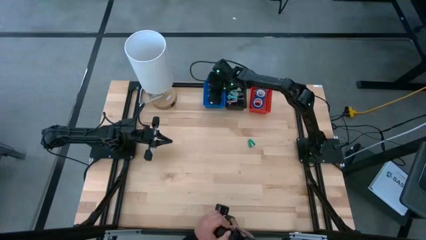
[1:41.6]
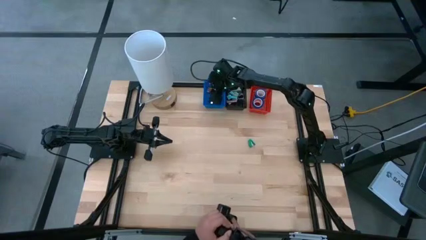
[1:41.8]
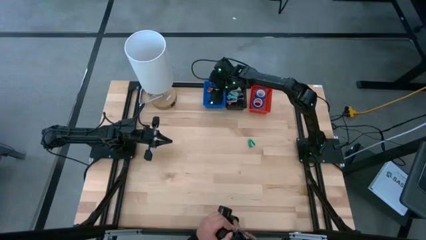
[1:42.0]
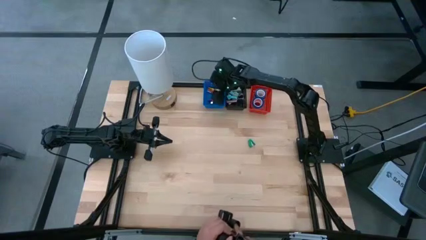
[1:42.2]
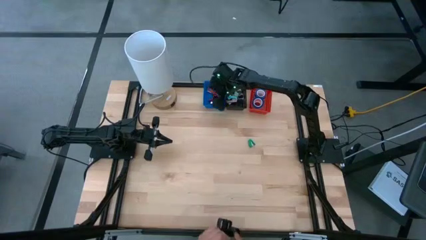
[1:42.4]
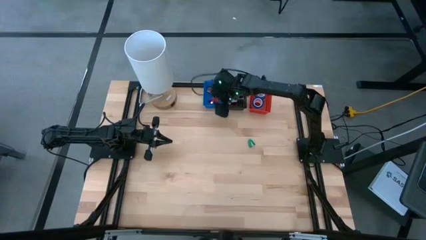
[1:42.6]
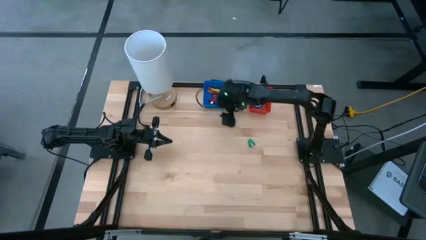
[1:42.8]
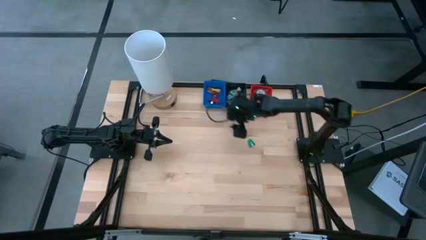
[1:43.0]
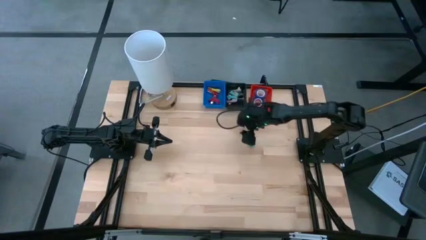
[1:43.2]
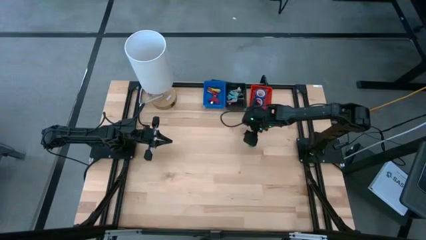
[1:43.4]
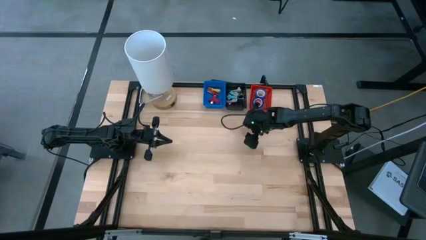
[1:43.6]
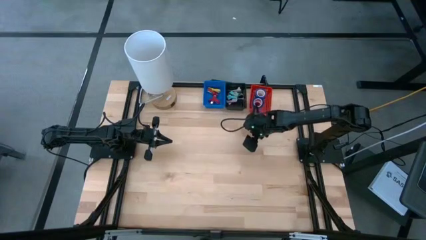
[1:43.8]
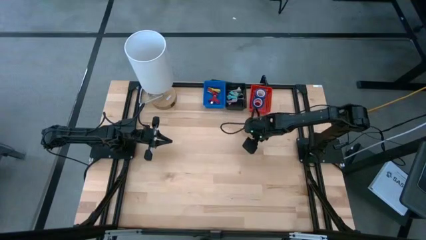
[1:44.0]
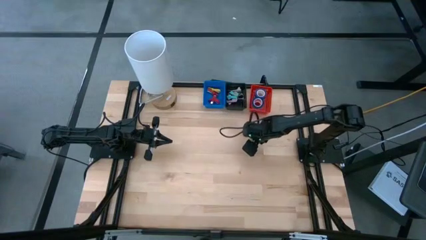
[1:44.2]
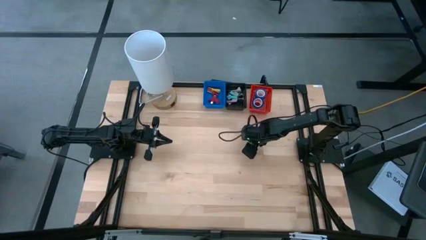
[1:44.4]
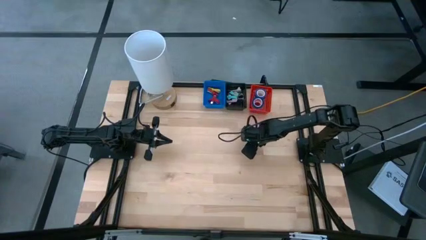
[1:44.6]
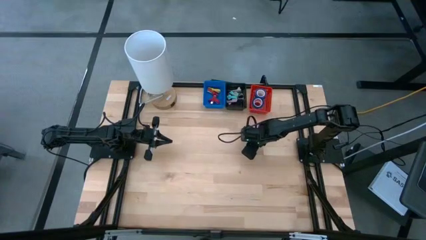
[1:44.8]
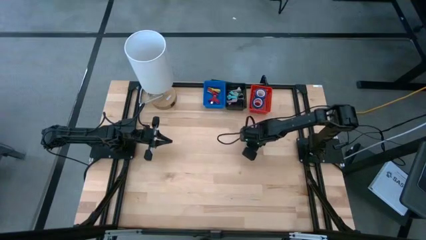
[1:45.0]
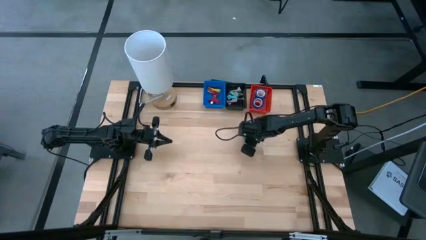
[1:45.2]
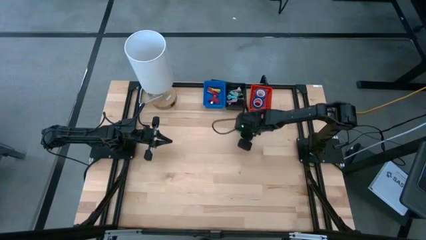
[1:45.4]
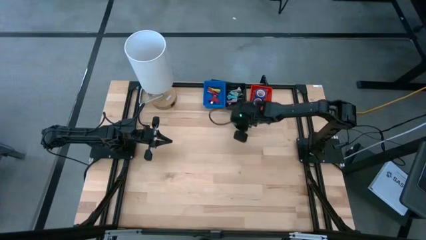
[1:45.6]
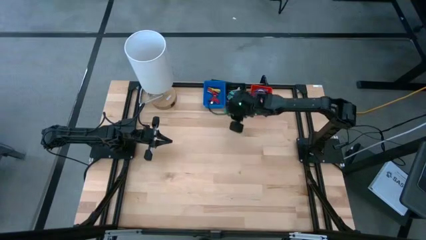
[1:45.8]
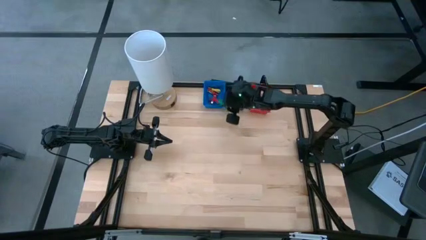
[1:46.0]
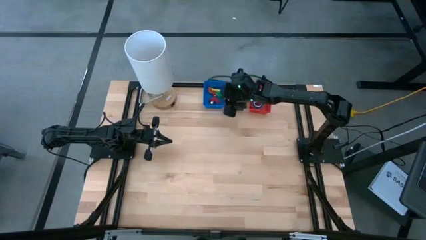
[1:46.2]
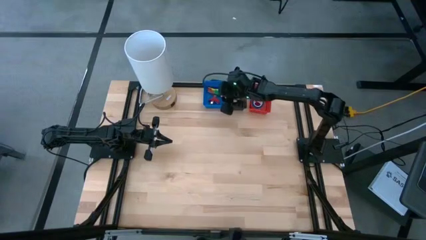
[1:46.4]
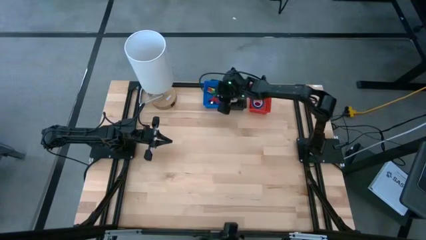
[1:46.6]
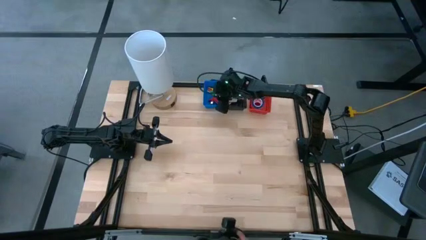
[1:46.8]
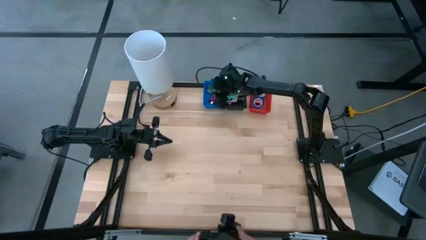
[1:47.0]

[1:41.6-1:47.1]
Task: Pick and place Stapler, Stapler remover, tape
Put the green stapler into the blue bin

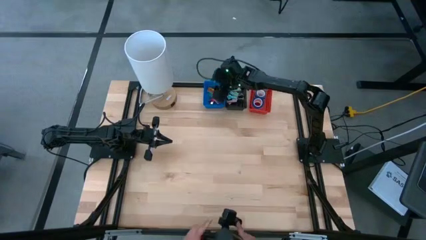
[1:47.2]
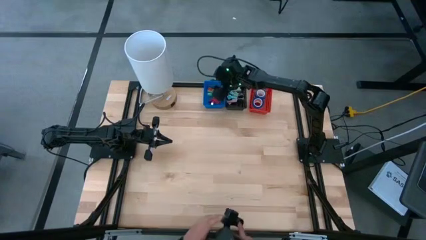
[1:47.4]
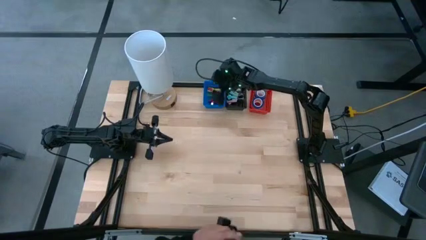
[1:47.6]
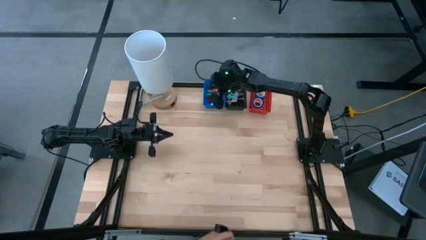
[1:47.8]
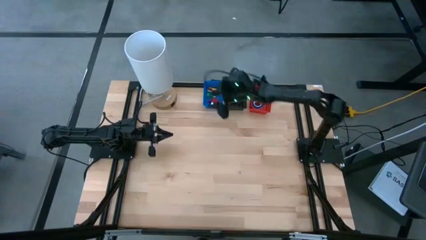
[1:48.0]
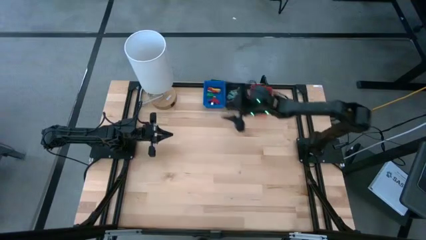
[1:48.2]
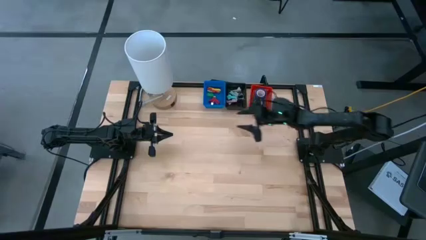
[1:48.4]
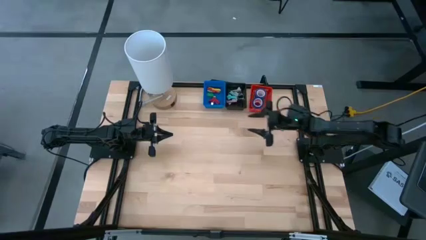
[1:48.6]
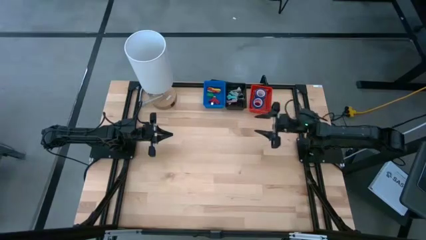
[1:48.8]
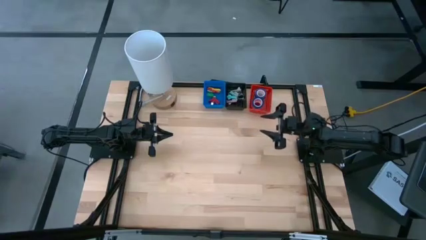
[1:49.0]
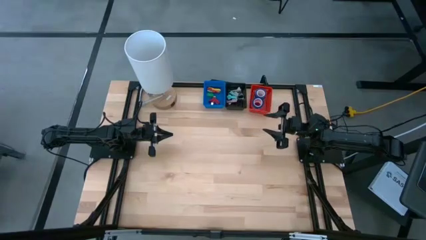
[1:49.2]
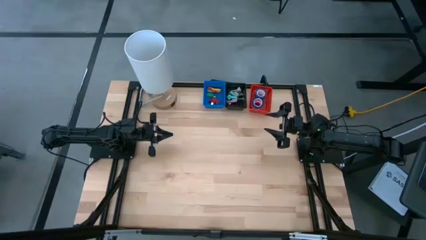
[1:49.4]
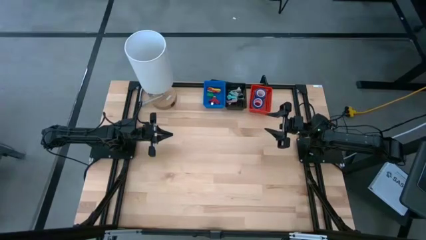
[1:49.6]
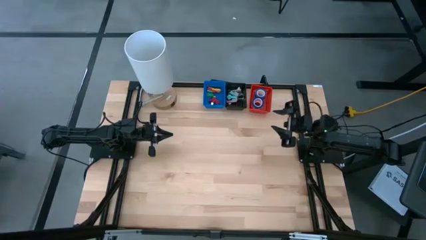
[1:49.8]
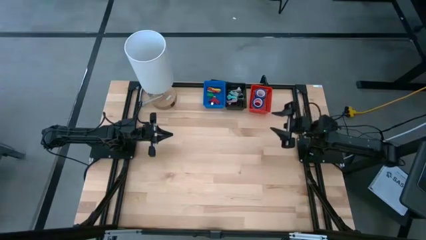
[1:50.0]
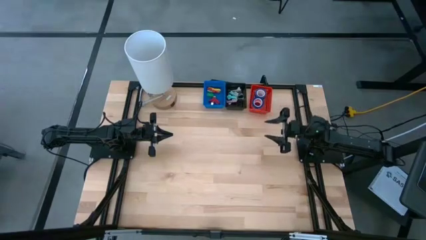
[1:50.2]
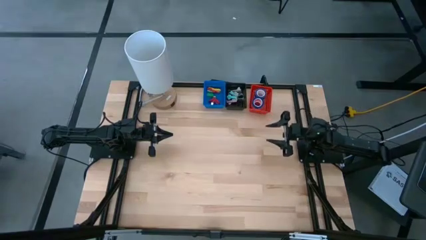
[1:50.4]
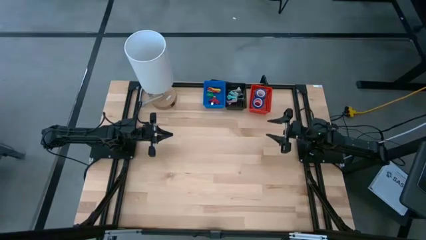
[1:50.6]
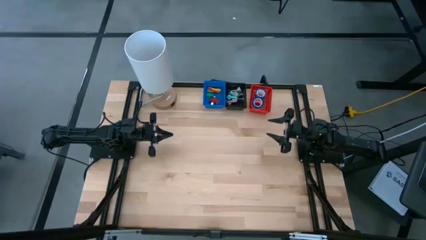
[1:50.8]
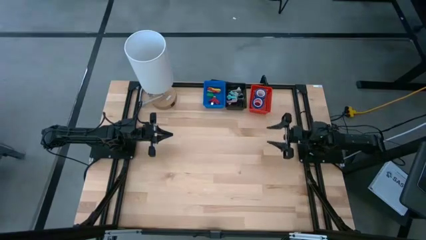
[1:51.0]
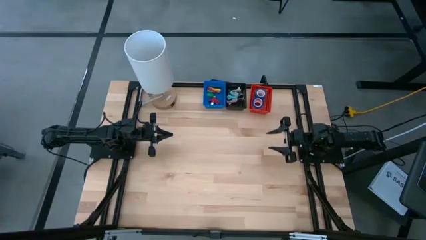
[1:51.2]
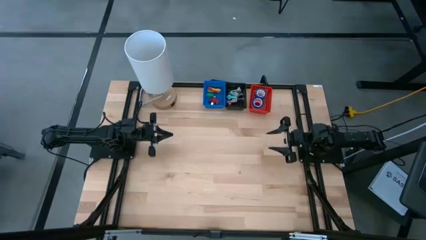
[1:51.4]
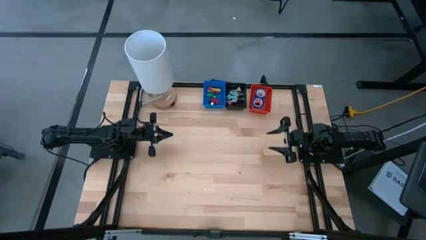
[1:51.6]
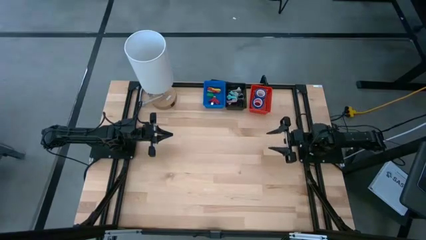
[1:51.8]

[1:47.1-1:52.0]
Return to Home Position

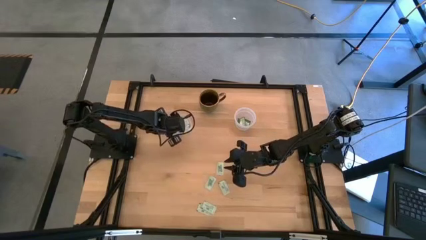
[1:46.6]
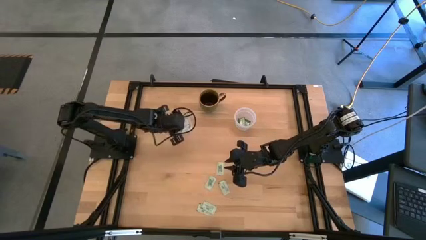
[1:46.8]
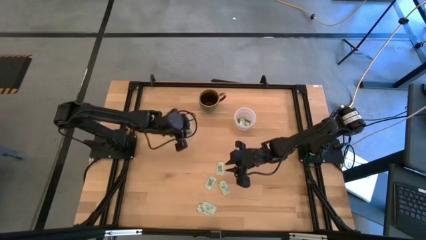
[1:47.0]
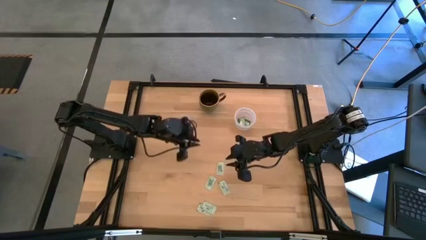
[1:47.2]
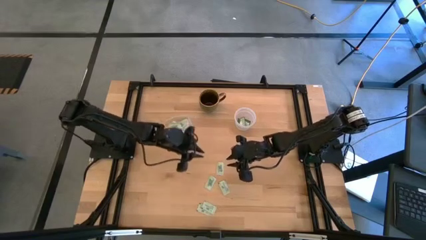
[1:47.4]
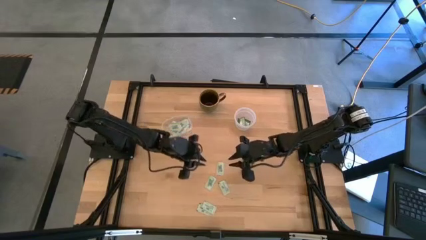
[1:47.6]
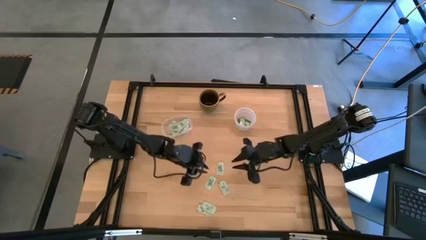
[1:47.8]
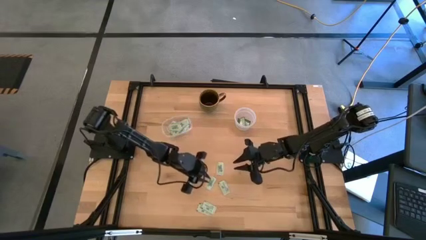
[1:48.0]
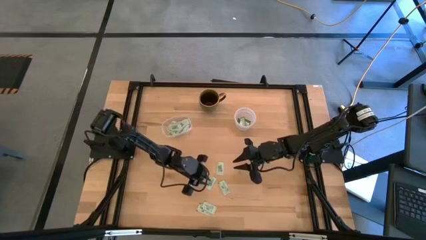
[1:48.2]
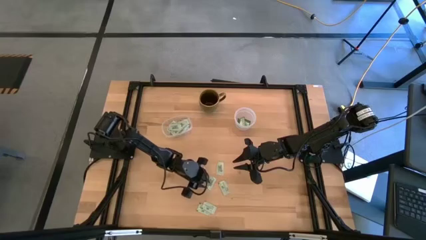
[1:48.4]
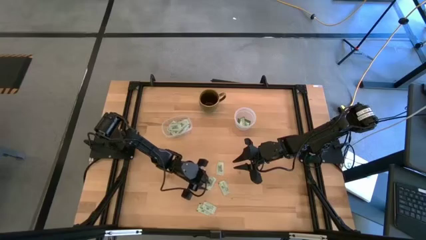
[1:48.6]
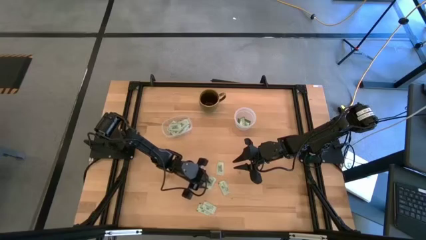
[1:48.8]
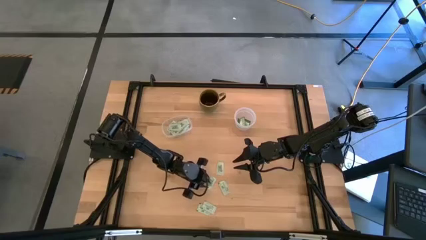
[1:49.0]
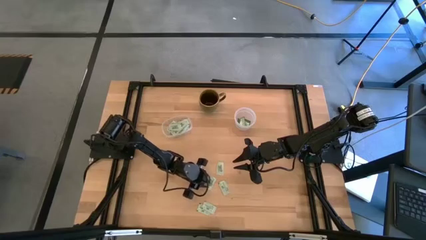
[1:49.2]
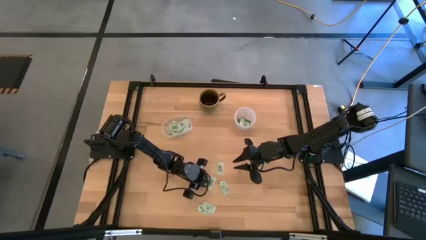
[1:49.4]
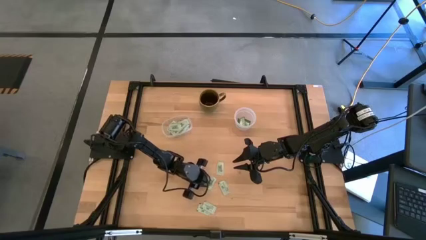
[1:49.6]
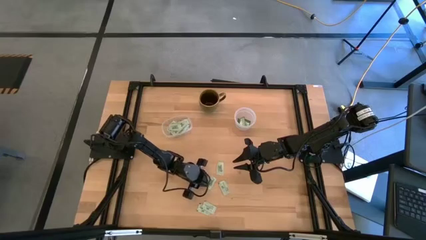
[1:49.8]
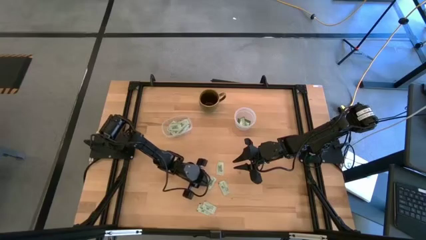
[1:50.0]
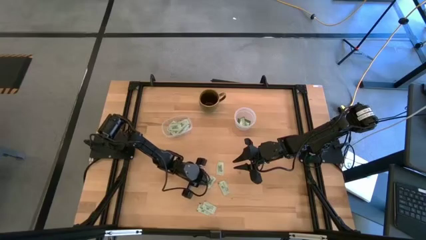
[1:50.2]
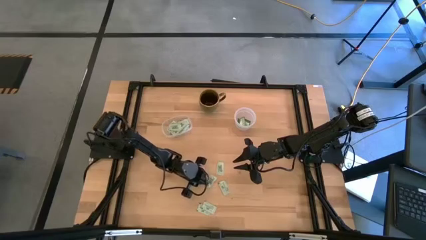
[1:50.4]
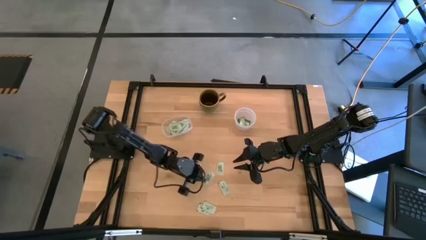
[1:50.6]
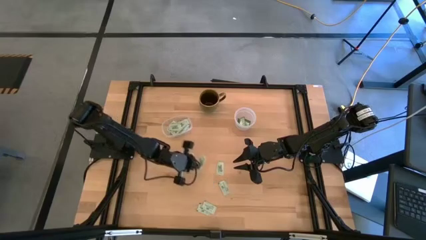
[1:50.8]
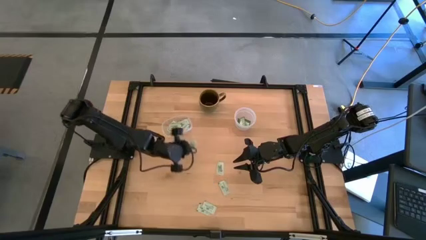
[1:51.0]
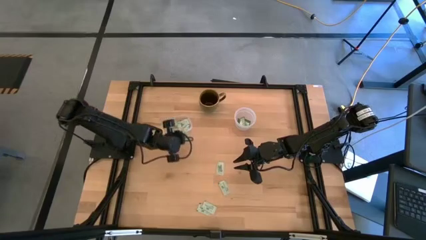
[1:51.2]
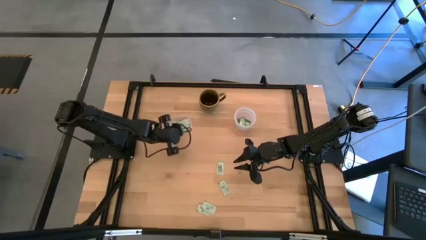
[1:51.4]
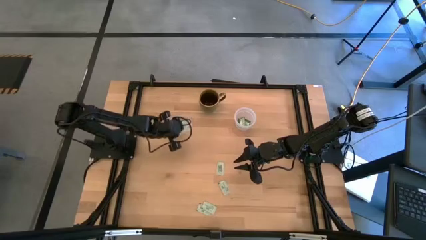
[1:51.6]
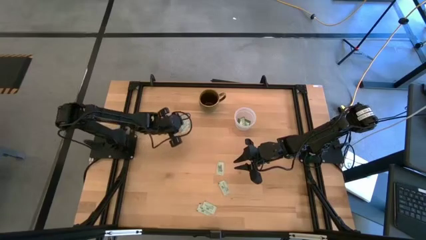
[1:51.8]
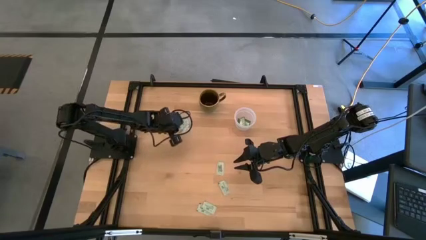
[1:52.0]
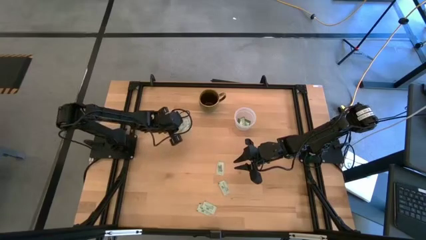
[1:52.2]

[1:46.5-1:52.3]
Task: Pick and place Stevia / Truvia into bins
Put the light green stevia packet into the left transparent container
